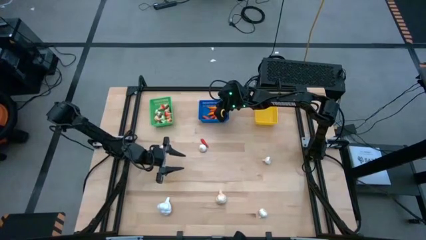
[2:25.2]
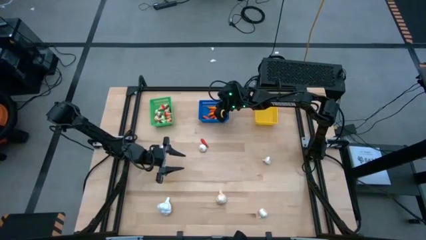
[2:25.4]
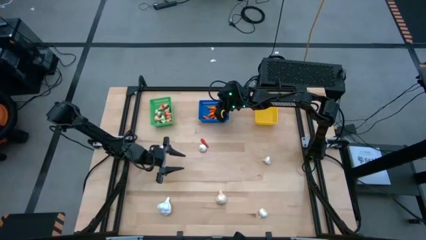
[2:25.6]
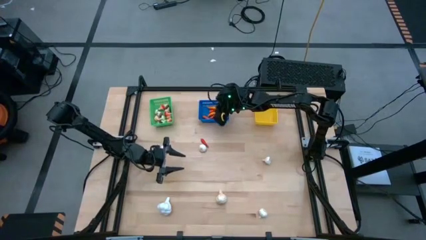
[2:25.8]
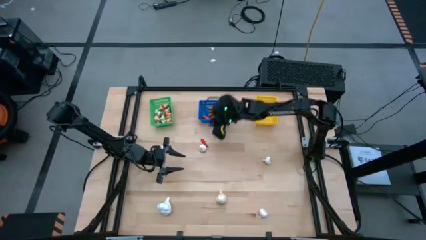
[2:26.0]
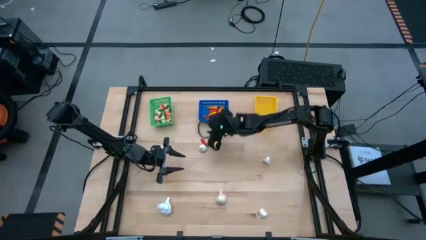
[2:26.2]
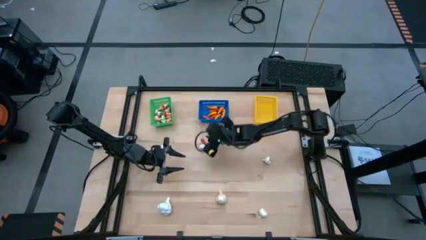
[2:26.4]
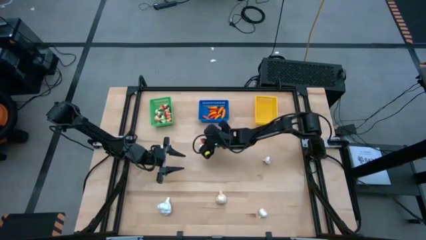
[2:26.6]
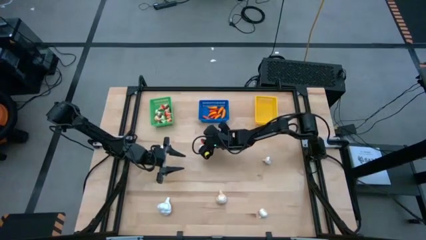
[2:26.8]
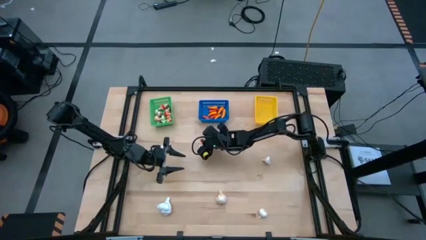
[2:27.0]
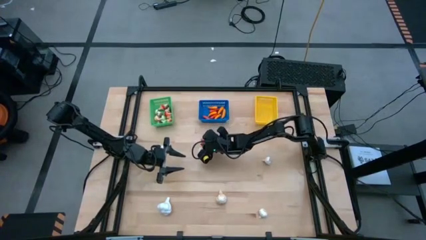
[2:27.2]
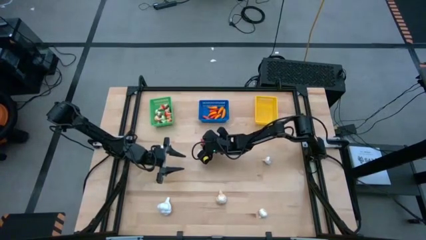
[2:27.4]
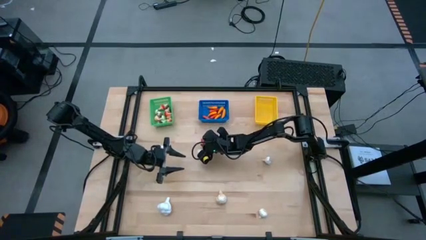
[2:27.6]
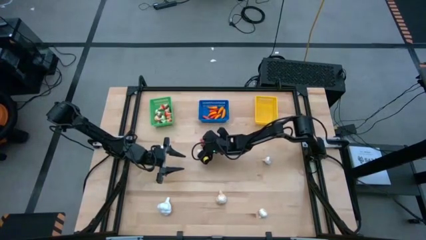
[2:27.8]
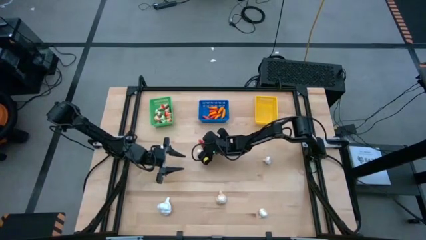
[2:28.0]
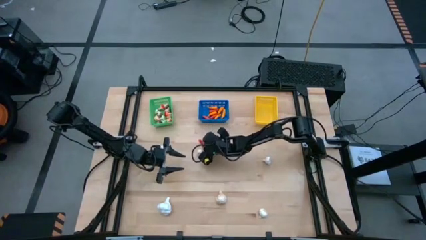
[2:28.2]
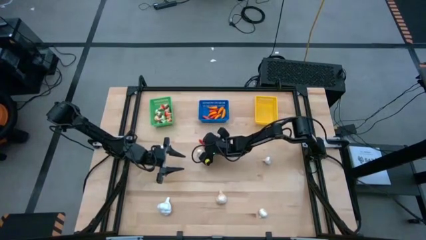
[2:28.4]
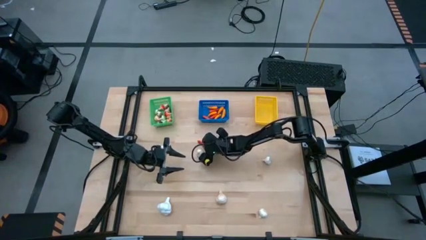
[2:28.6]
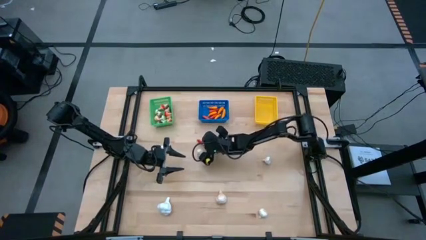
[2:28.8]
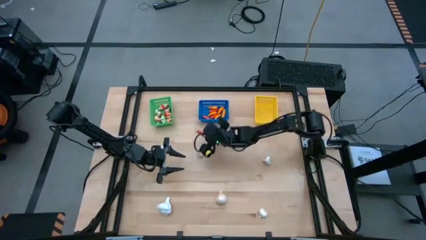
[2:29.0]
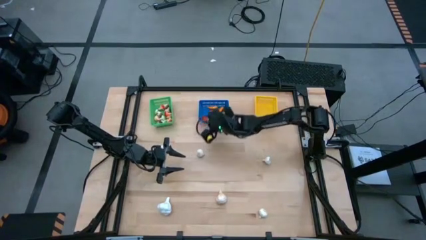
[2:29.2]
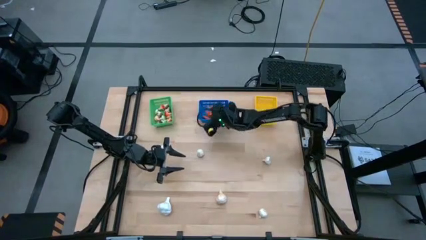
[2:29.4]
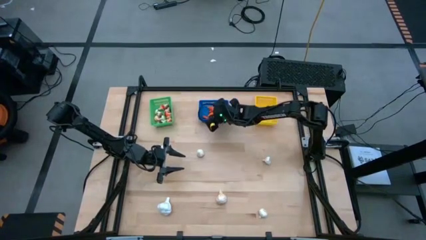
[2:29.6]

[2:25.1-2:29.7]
Task: Sort produce into baskets
Put the orange chili pepper into the blue bin

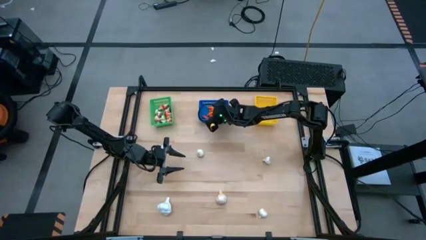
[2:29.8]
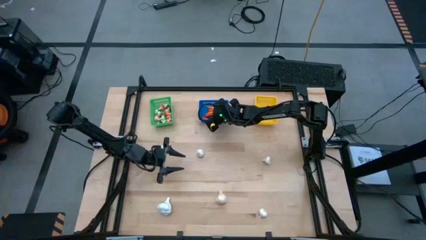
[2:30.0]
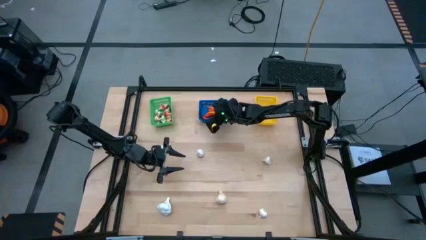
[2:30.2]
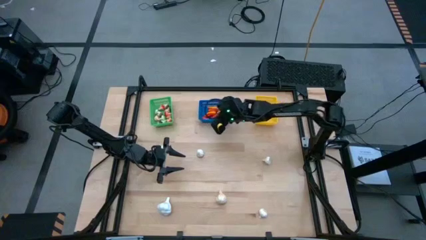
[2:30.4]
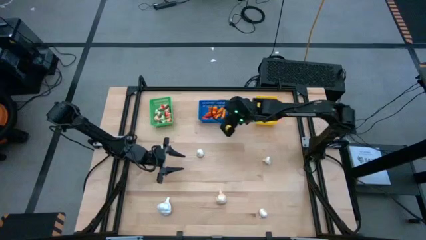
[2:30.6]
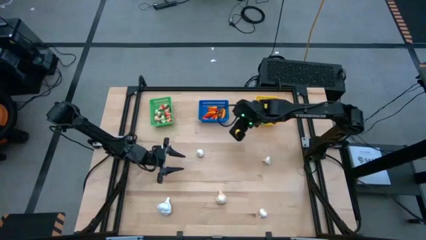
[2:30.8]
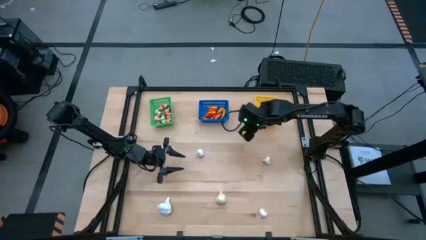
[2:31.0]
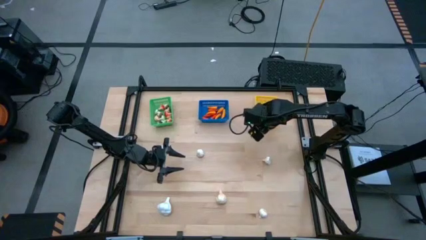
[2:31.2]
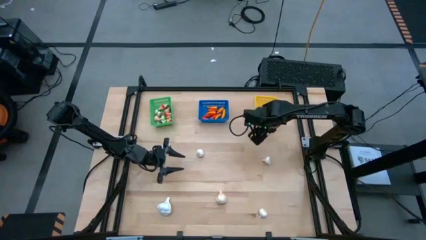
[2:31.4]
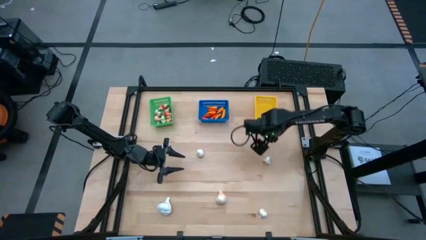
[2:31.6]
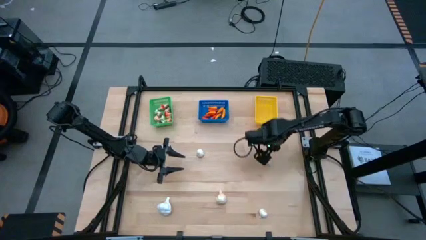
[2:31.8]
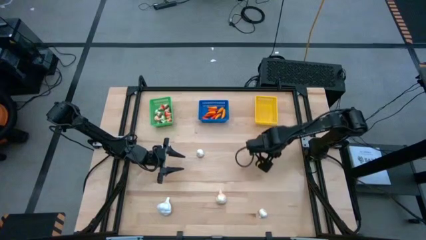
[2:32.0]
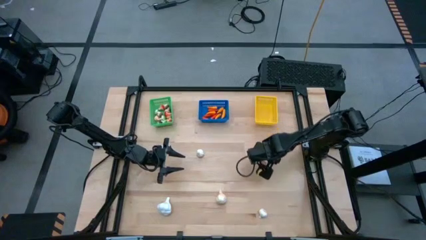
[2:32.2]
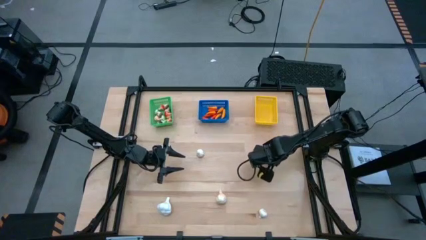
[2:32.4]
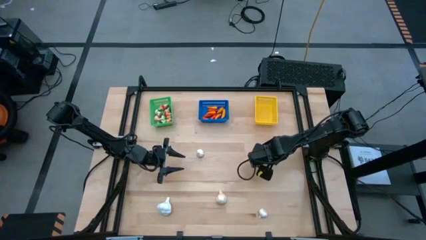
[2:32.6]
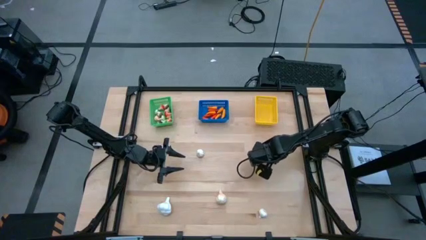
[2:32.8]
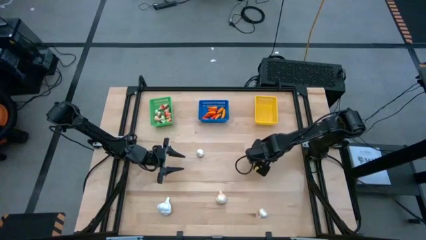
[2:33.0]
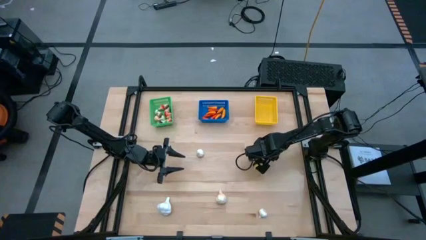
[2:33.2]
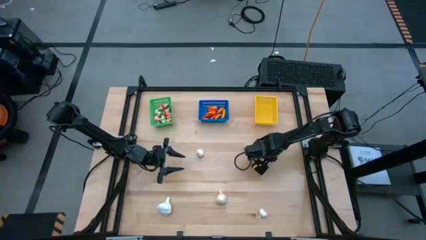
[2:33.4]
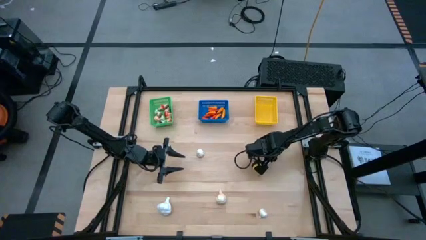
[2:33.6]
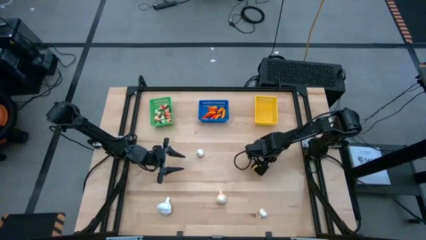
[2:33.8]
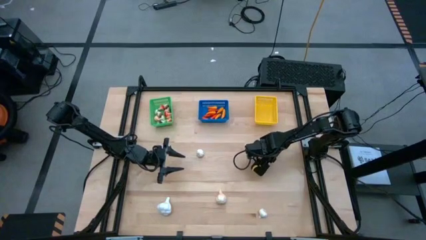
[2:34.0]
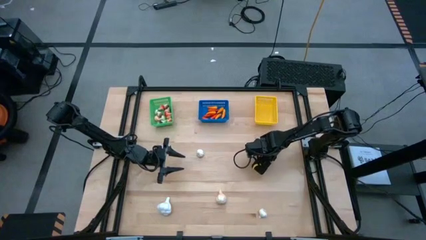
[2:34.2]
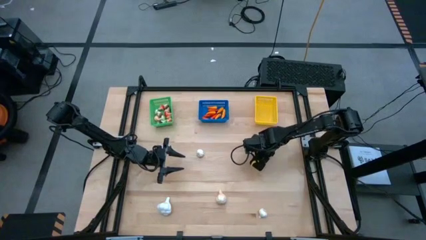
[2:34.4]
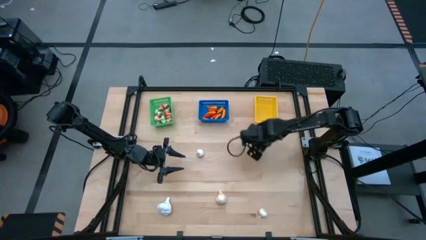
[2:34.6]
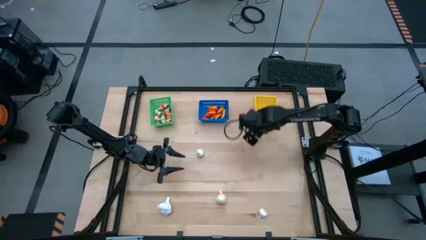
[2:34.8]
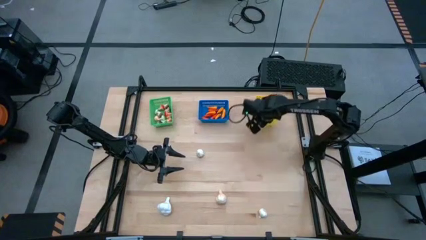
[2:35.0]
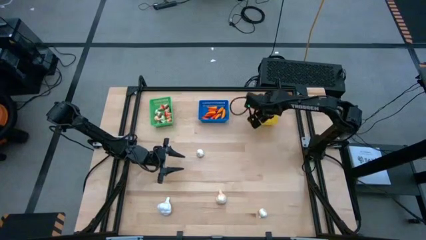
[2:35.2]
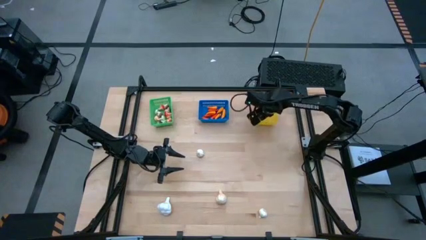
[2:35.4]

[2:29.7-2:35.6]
Put the garlic into the yellow bin

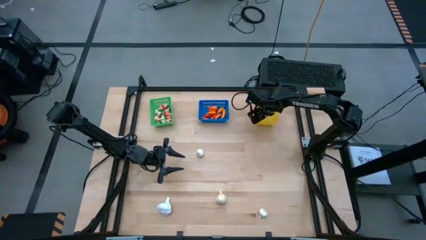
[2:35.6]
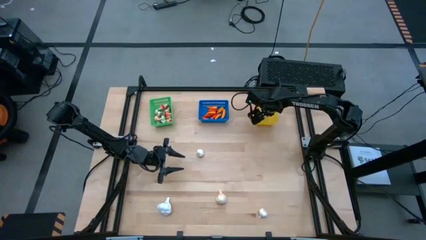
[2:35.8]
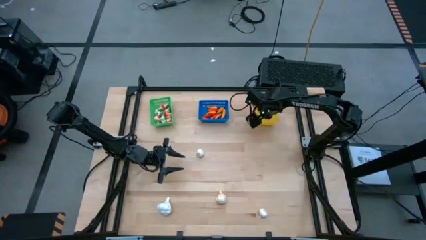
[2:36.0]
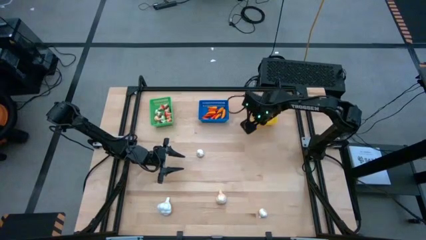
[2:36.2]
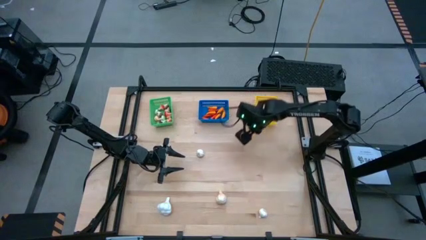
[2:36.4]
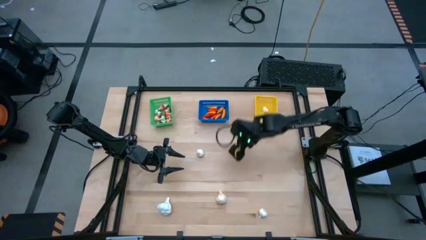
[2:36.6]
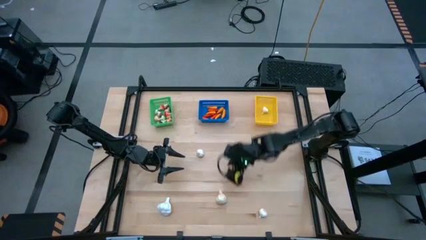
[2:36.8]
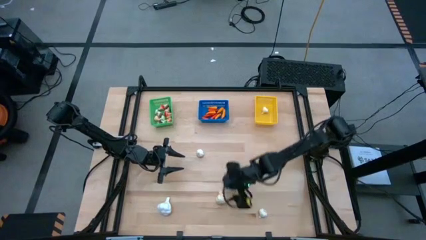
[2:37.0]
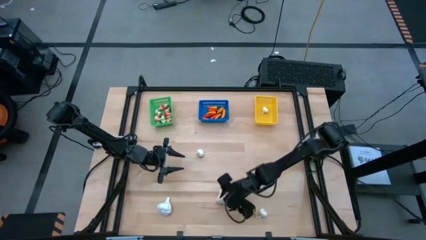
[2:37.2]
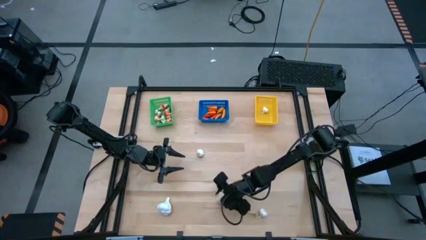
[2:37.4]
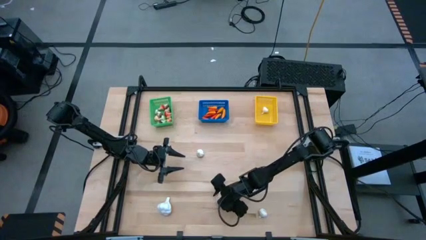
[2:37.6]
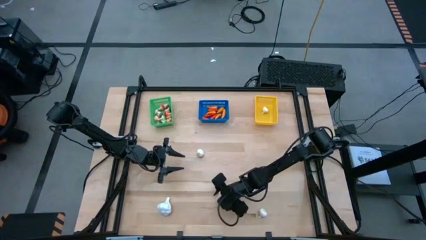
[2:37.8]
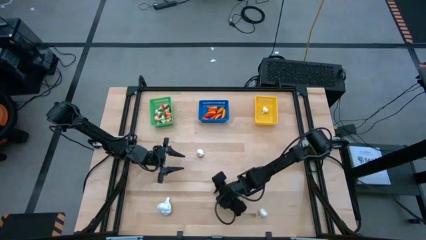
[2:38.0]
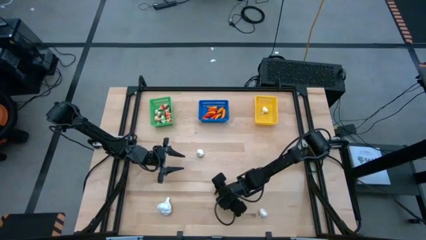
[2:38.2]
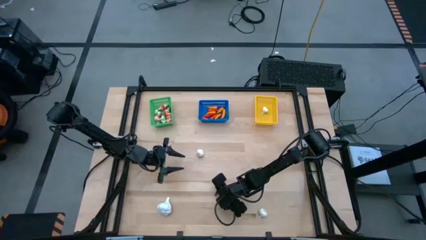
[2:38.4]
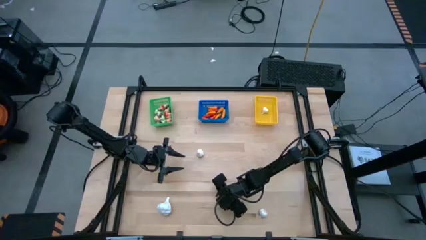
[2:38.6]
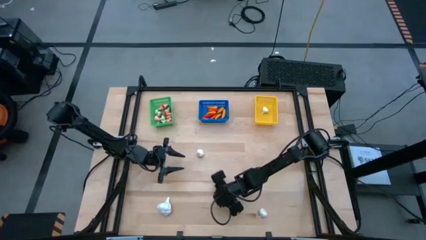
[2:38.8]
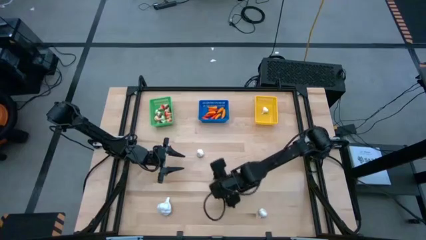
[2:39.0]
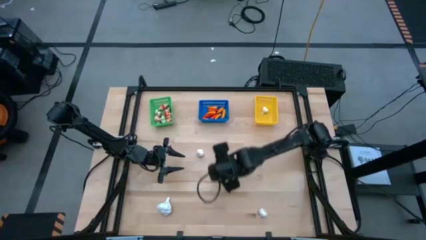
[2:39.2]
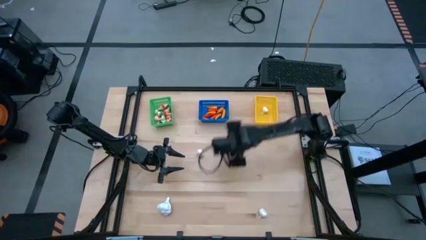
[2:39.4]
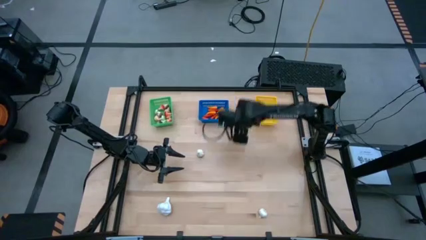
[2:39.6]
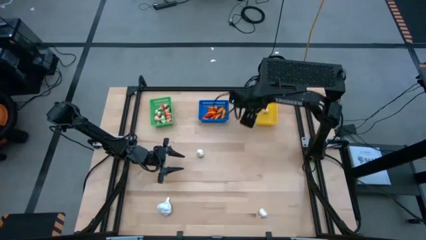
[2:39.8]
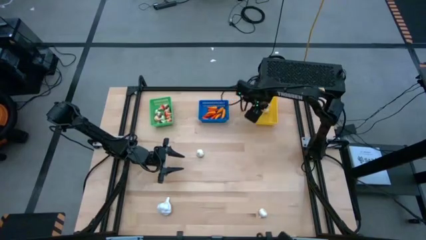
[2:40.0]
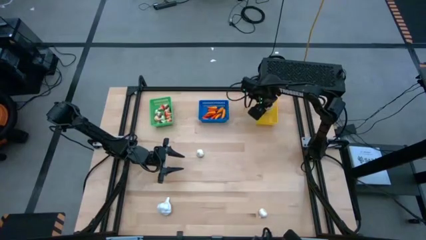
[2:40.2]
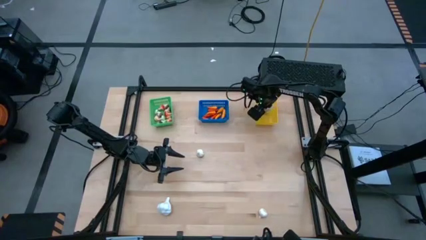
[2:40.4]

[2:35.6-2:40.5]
Put the garlic into the yellow bin
